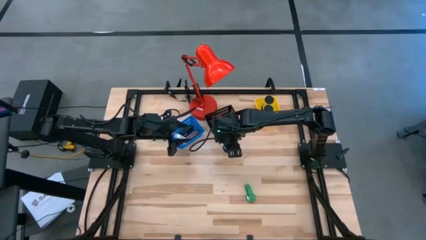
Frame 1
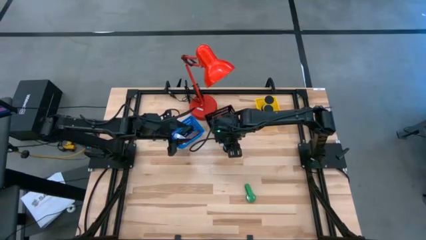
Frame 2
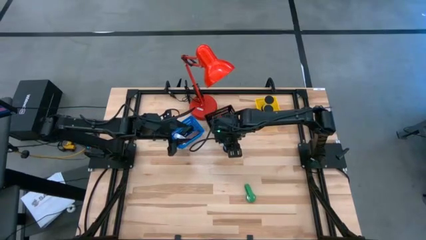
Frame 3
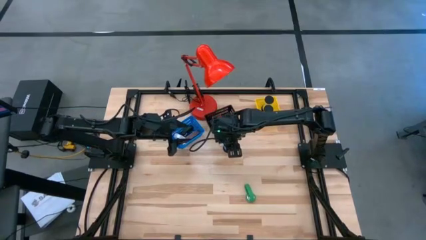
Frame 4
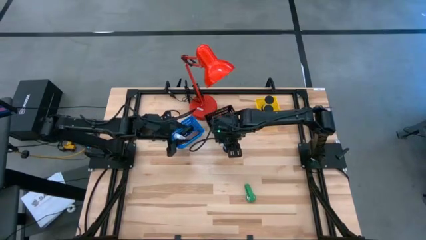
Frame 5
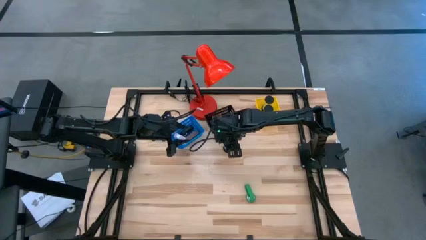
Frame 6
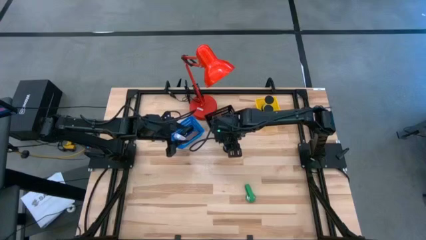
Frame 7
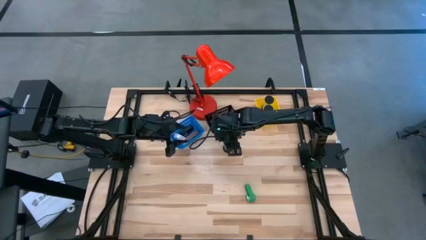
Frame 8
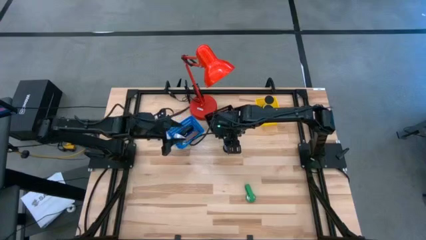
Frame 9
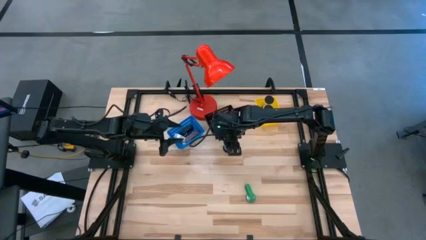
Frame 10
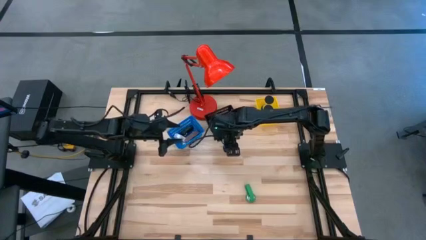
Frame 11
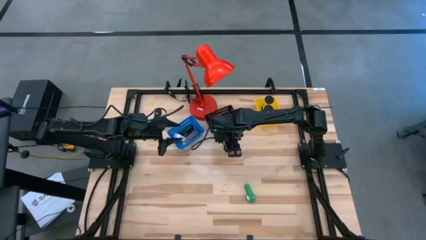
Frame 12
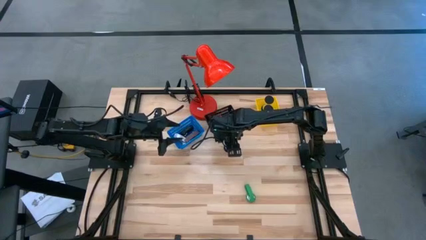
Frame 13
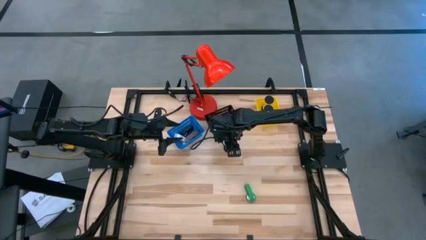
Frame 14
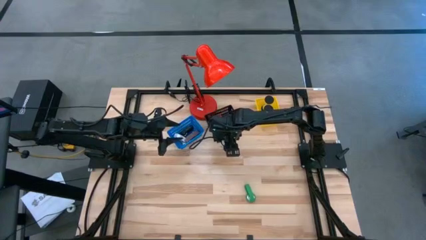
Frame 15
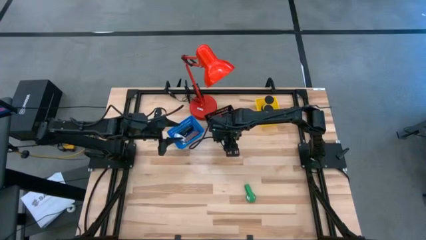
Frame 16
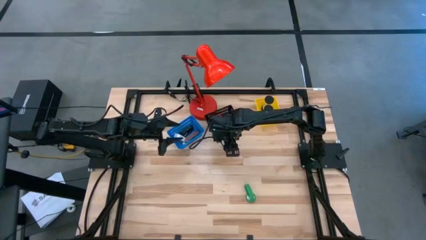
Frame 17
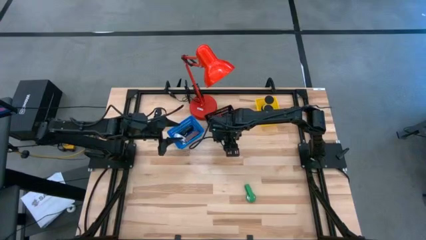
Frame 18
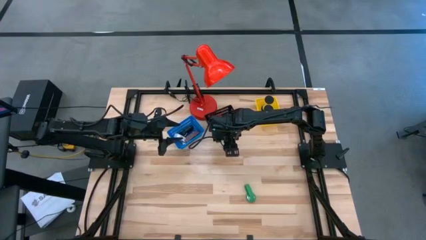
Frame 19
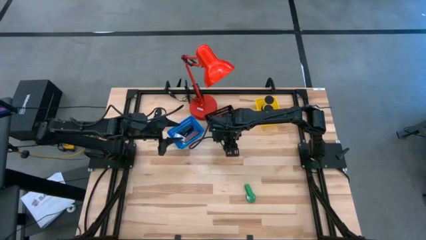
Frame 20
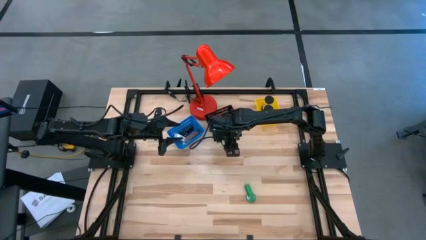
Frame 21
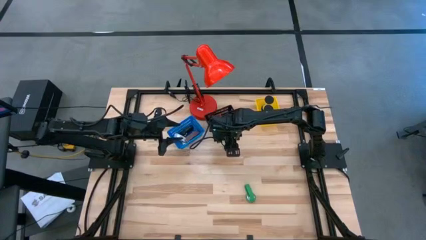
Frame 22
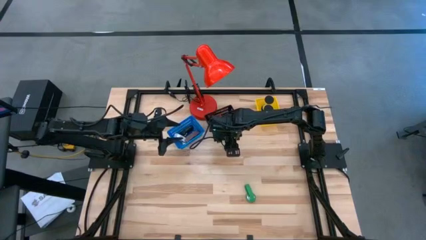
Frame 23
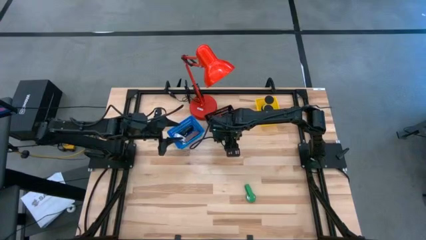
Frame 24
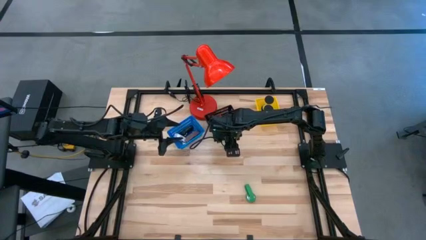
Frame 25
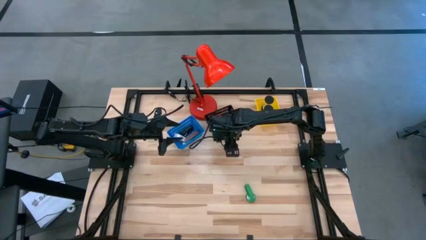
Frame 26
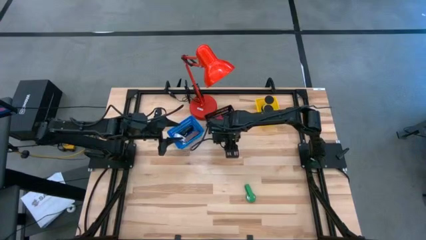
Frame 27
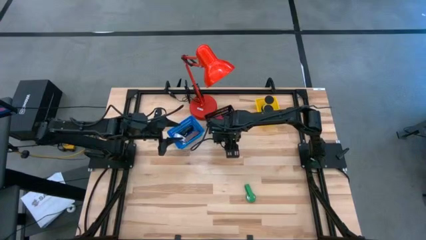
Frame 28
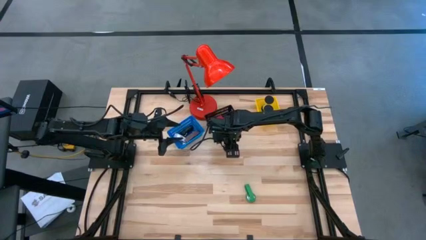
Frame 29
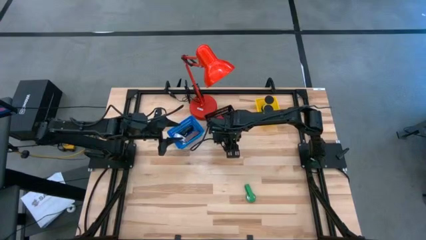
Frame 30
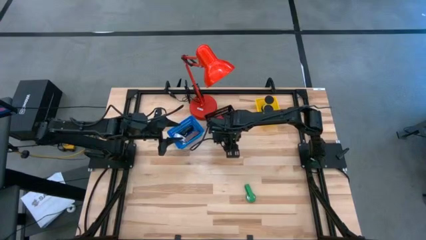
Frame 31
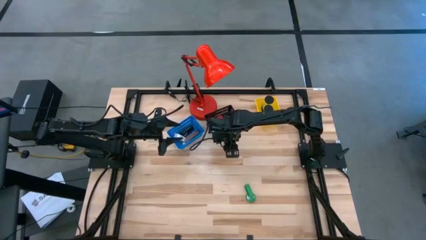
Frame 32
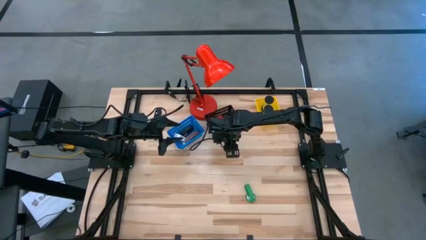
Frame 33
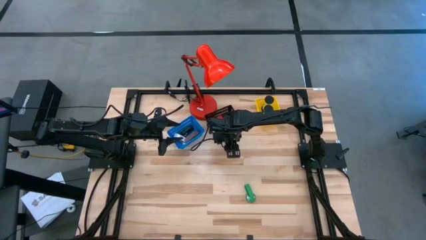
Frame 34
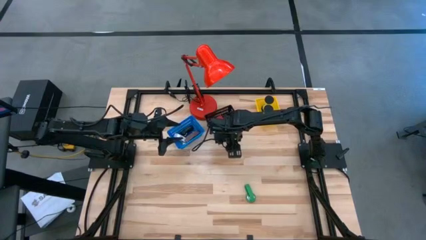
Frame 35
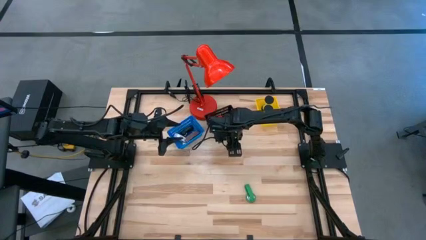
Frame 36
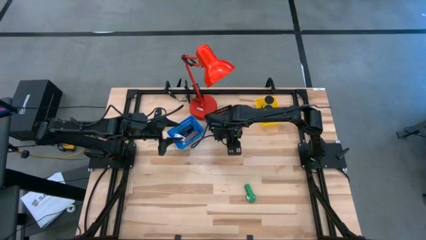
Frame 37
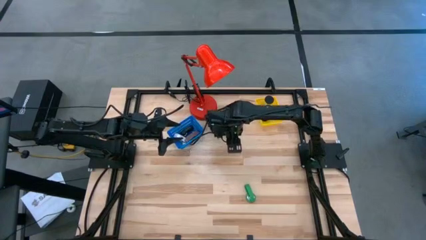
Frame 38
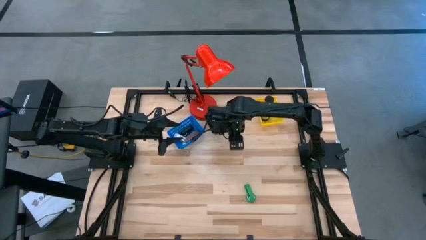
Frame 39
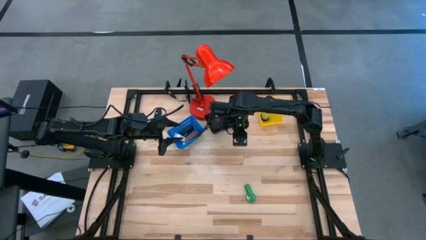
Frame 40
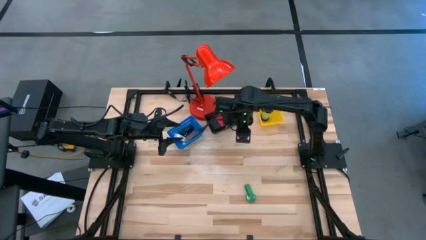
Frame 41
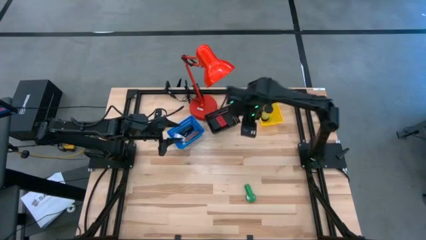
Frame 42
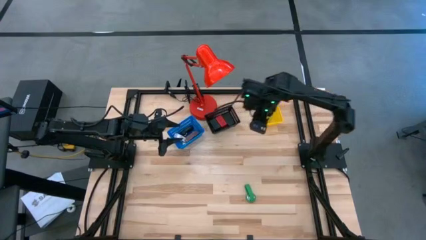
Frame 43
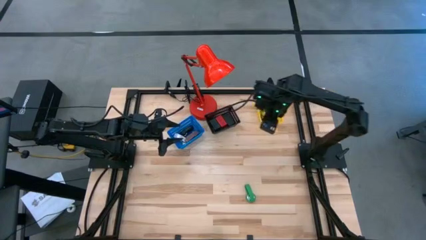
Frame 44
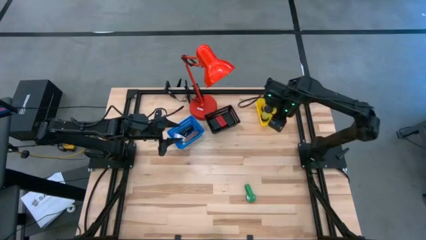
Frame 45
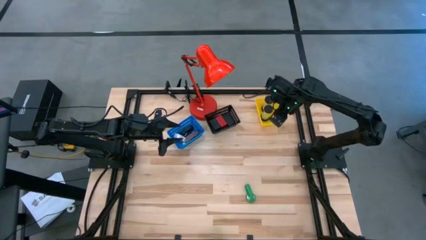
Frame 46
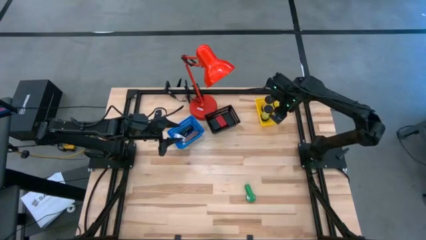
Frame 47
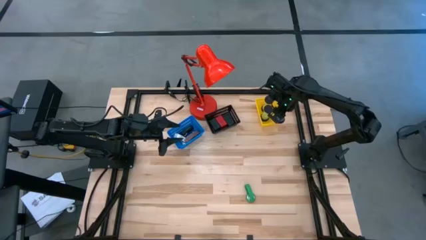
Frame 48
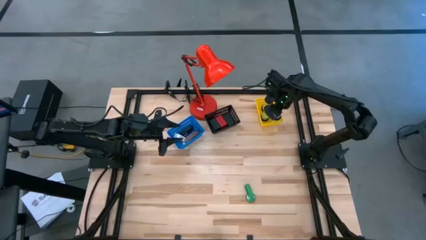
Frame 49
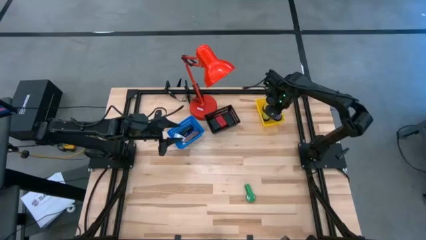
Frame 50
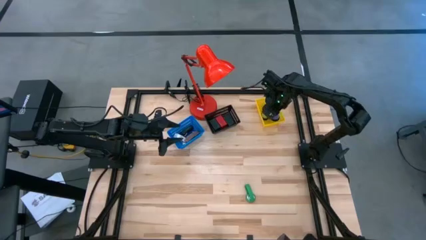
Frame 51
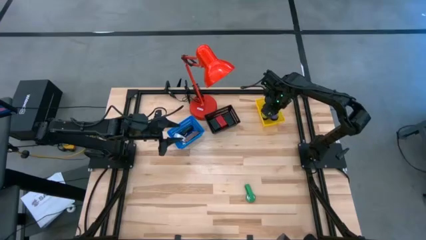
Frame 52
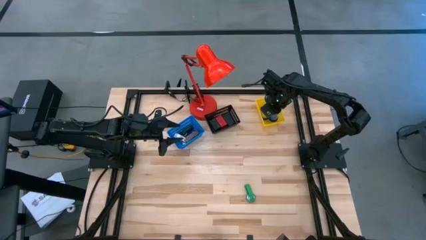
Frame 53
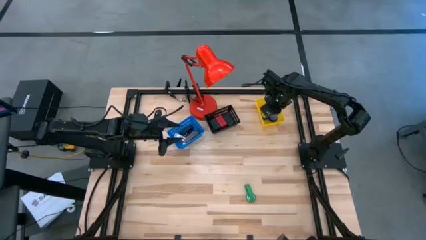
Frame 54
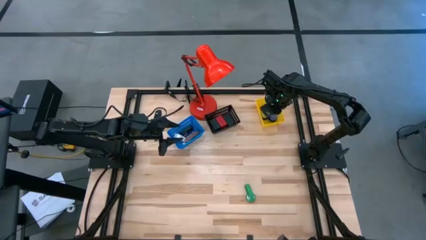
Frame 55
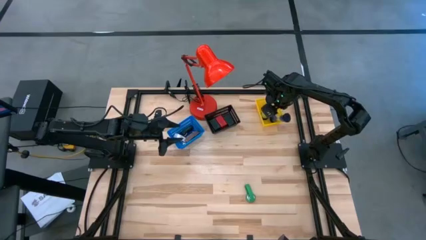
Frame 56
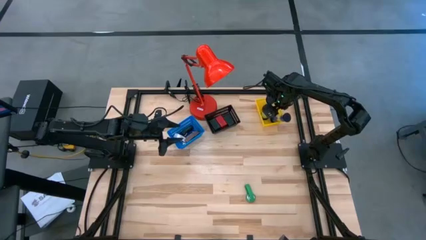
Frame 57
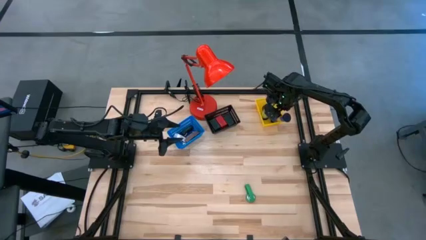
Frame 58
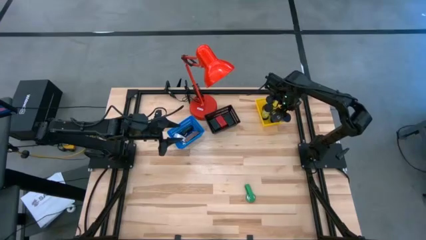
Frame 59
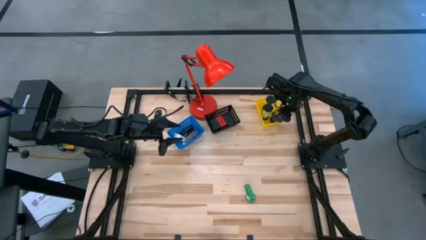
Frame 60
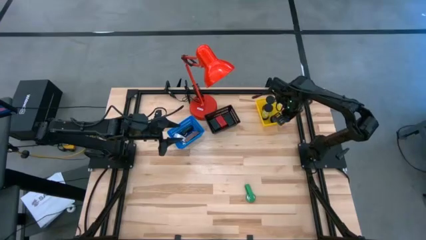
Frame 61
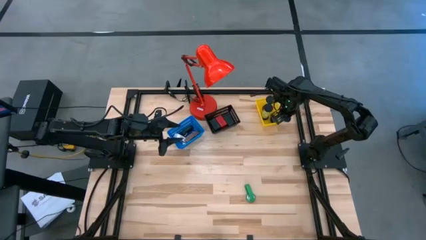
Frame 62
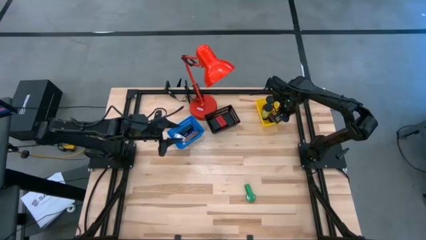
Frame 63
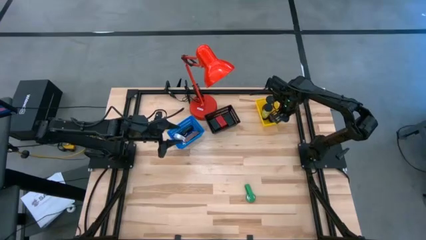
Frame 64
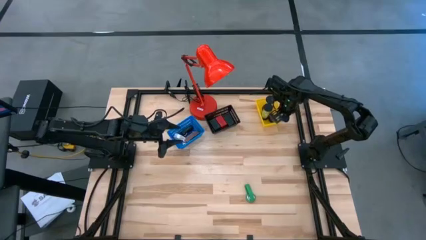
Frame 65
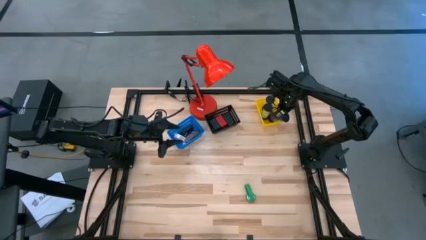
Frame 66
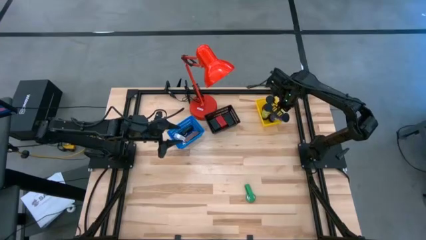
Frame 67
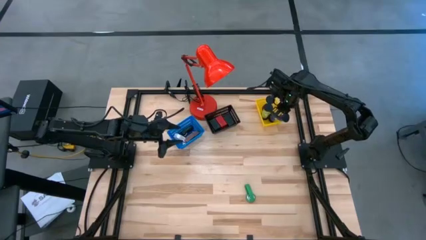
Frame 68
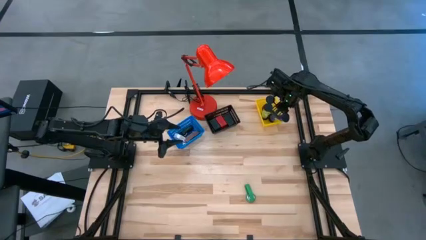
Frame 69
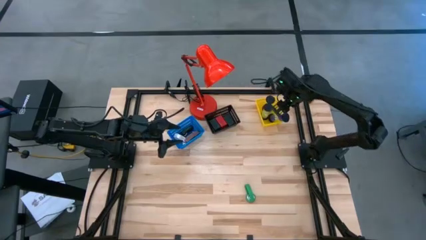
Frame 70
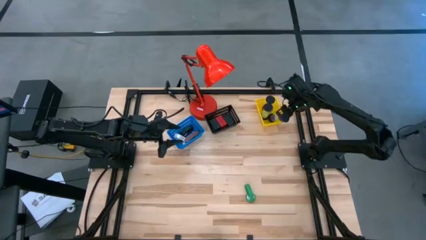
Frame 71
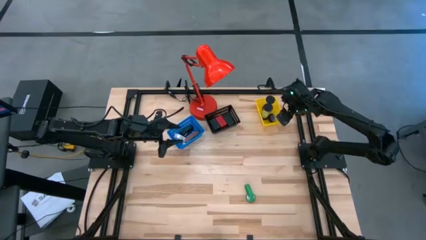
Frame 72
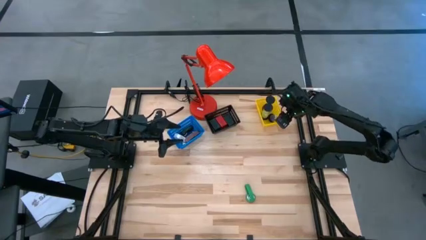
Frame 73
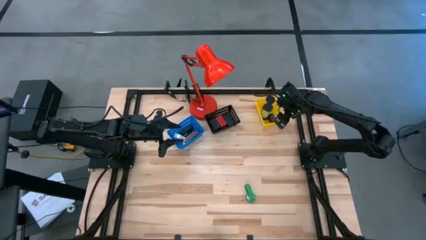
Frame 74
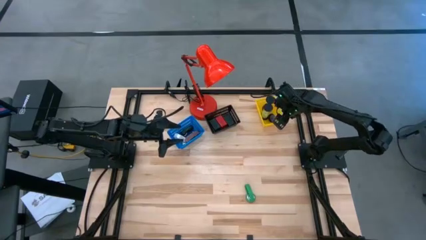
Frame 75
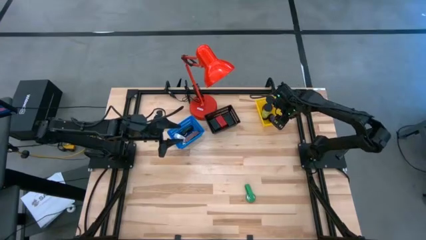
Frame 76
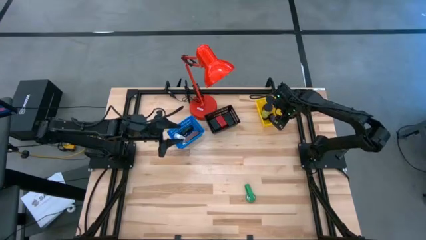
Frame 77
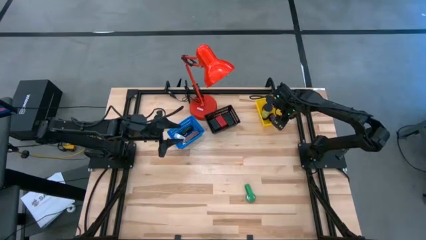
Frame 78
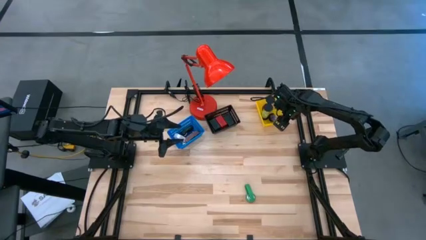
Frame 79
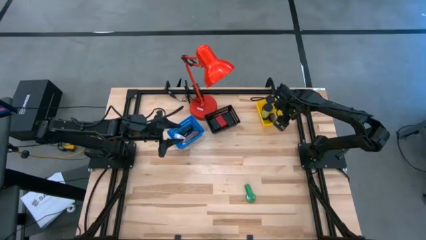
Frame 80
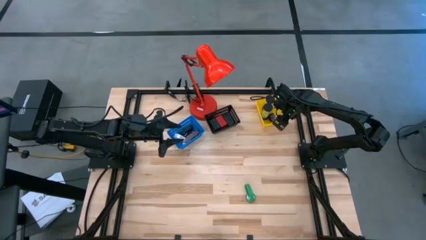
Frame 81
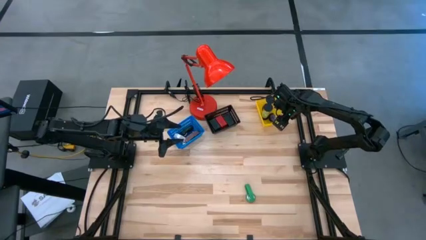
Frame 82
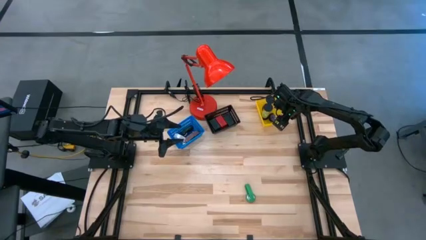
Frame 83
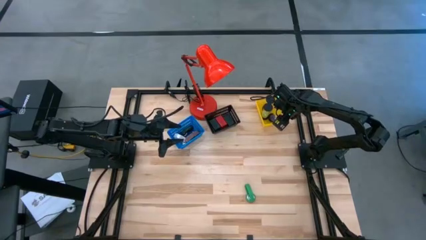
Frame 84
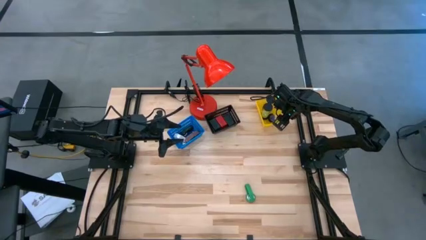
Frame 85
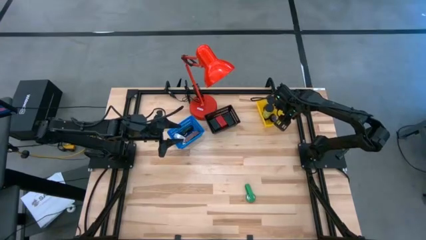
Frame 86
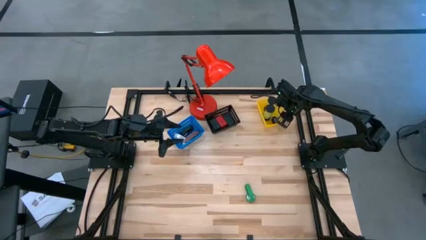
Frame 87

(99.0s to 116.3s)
Task: Pick & Place Office items
Put the blue hourglass into the yellow bin
